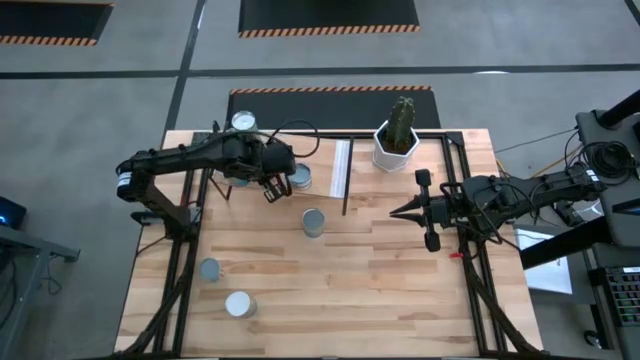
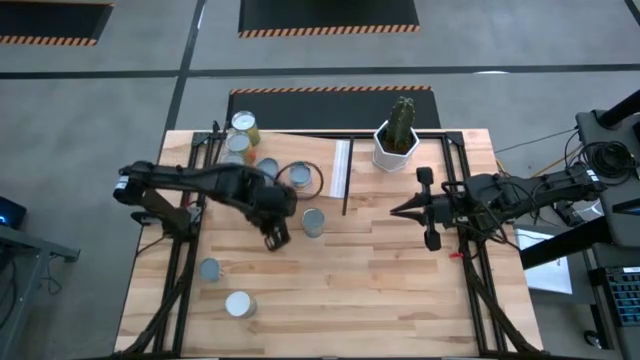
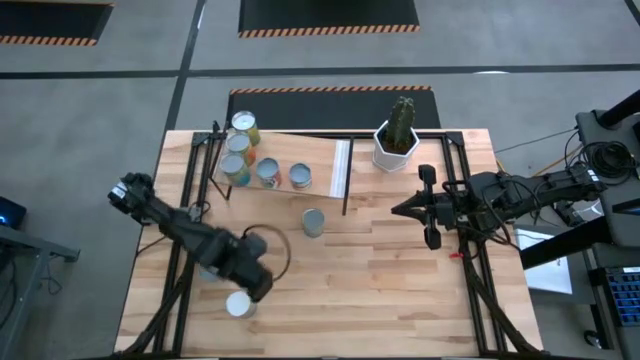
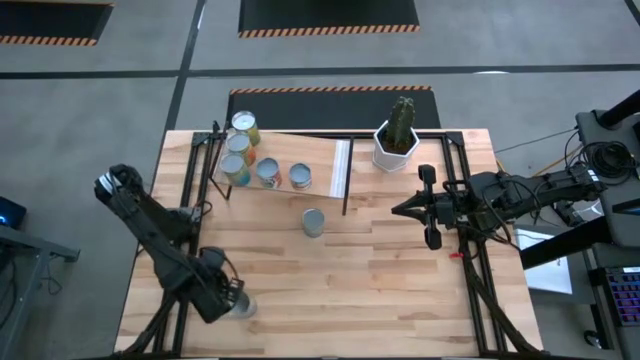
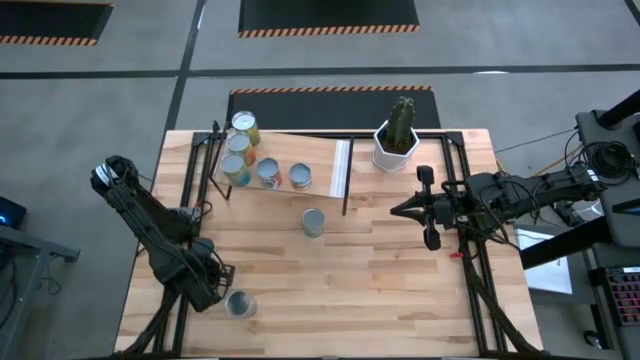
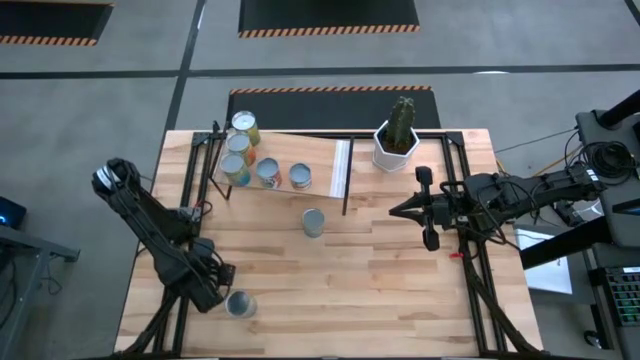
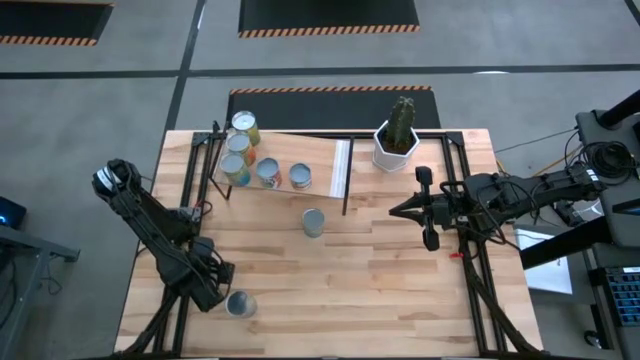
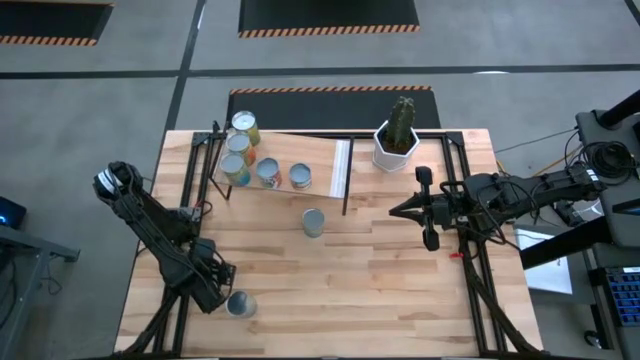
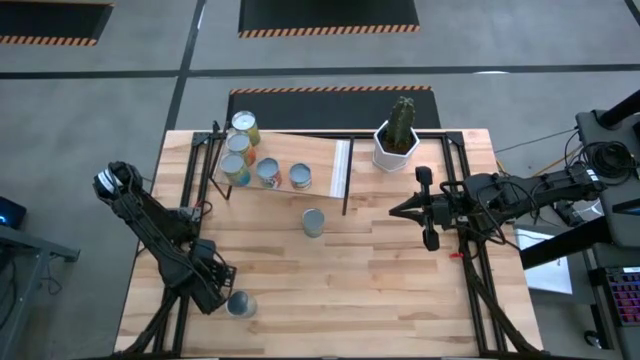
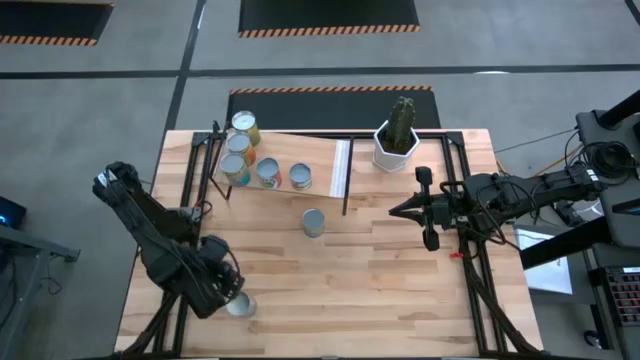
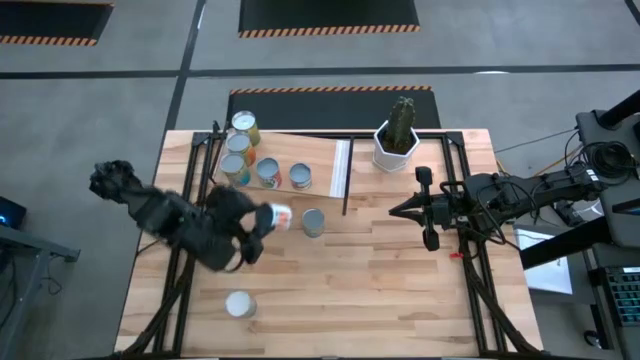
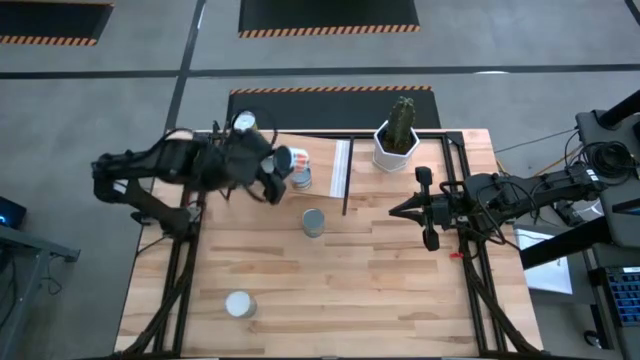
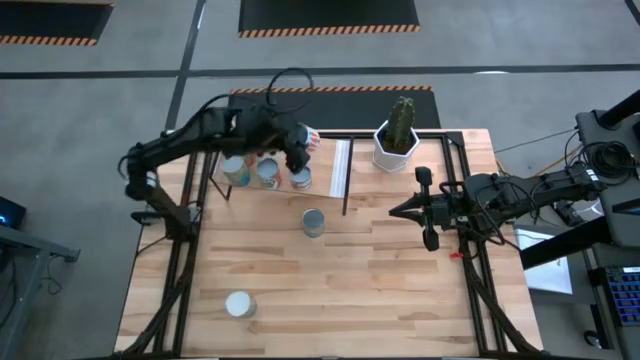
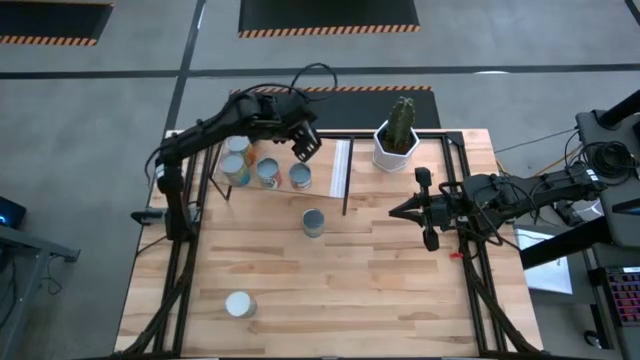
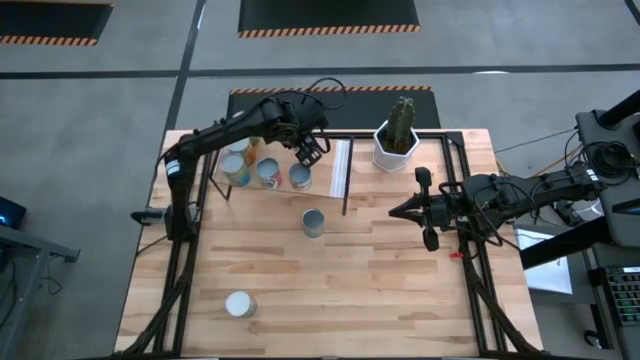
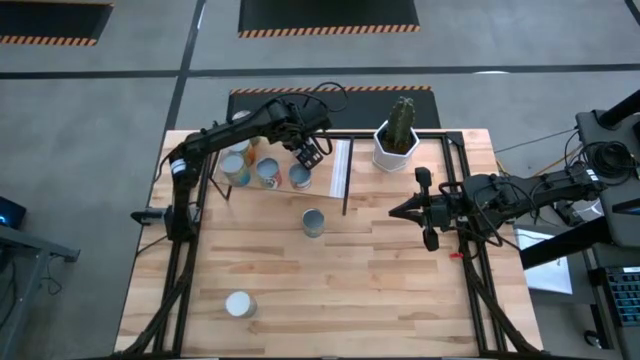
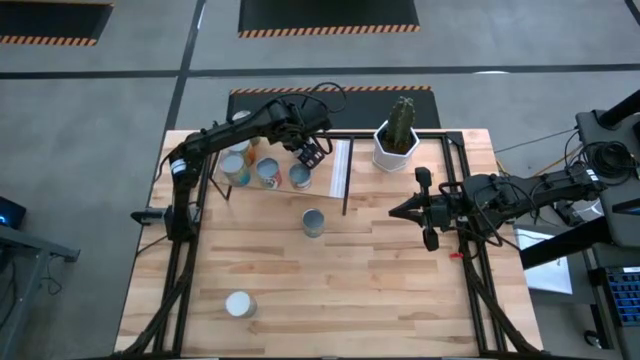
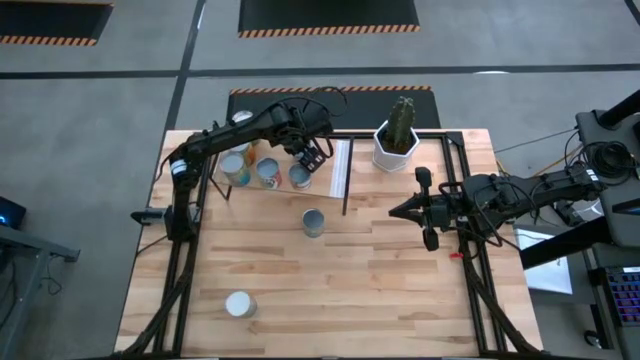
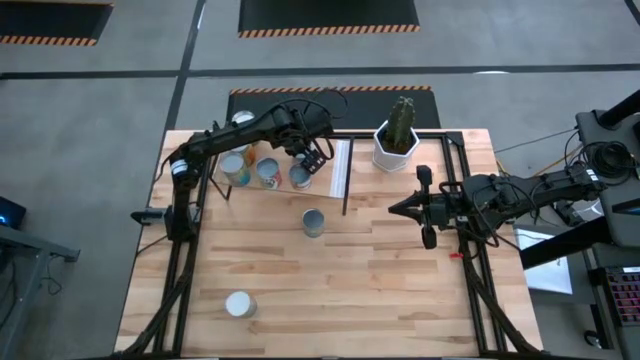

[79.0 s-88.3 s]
Task: Pick and place cans onto a shelf
Put the canned carrots on the shelf

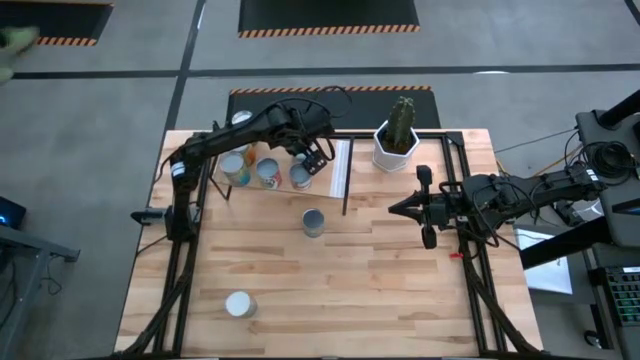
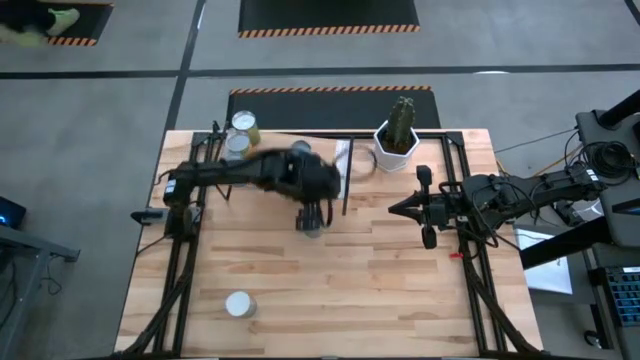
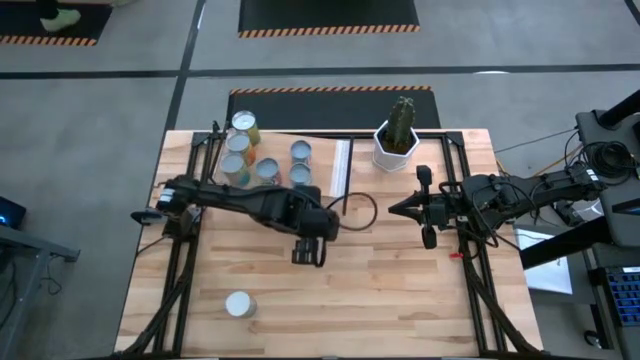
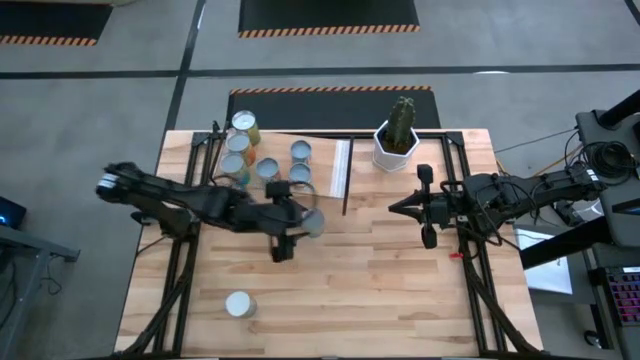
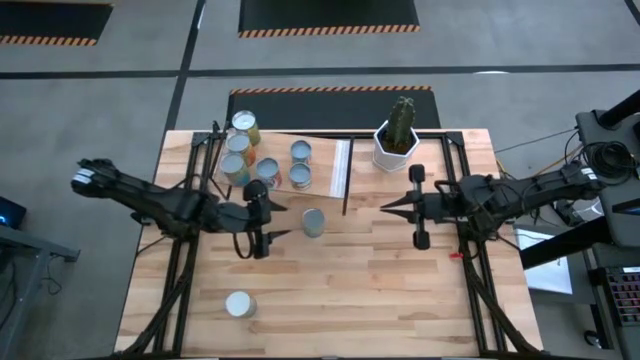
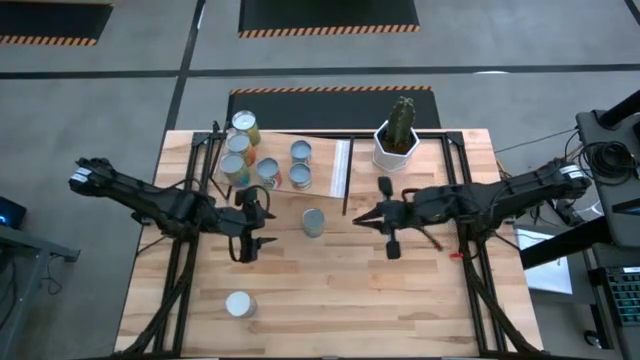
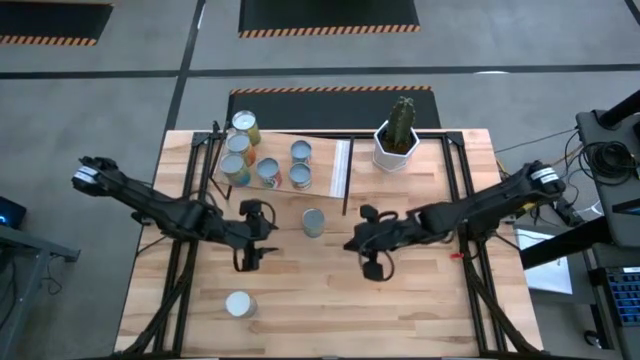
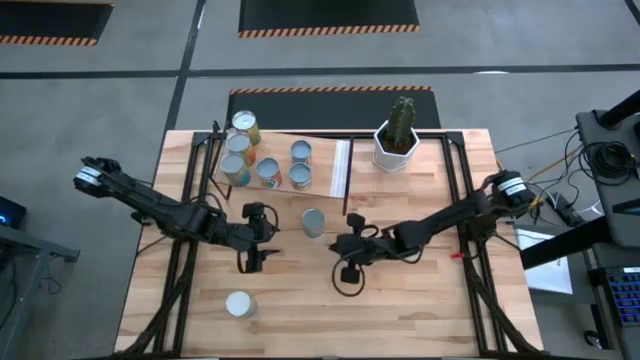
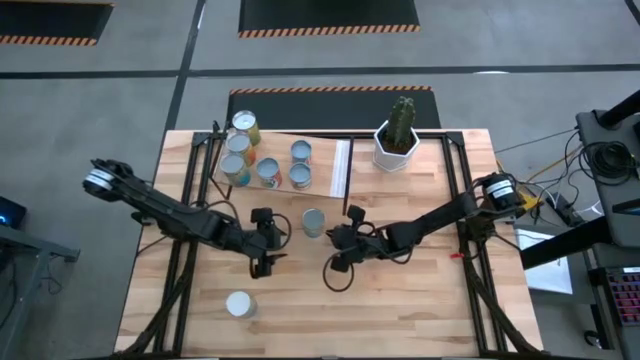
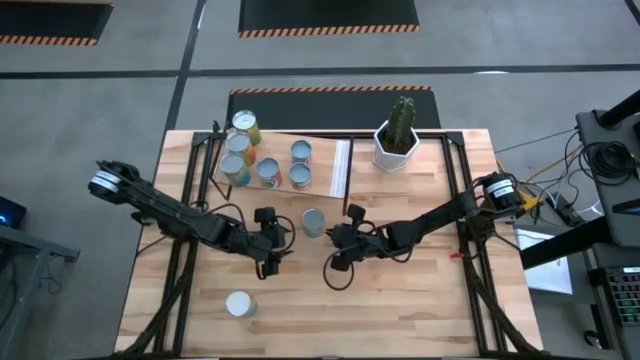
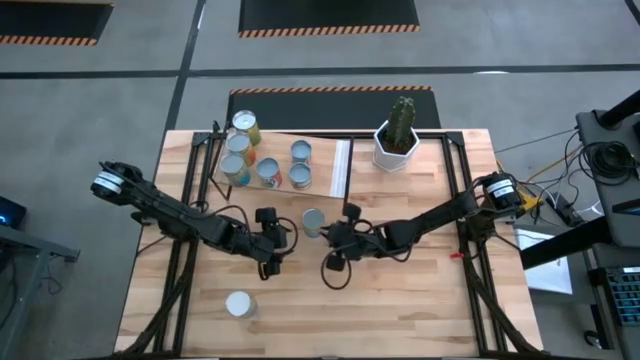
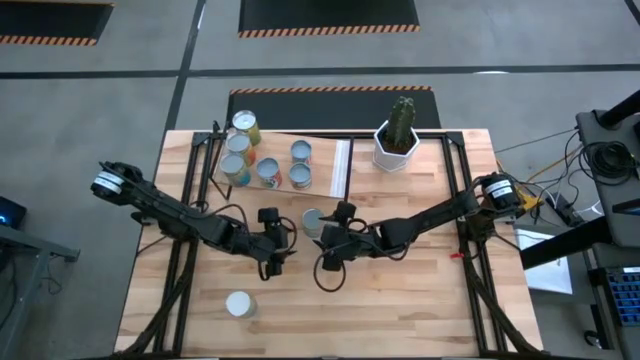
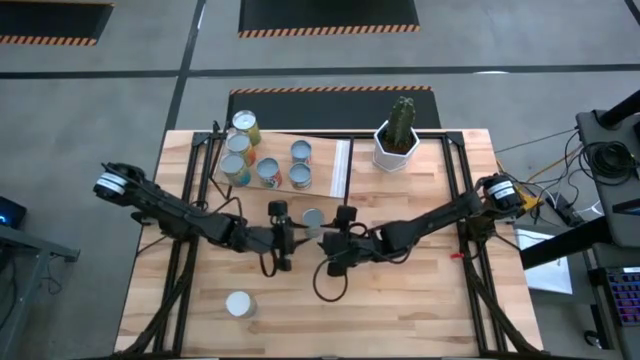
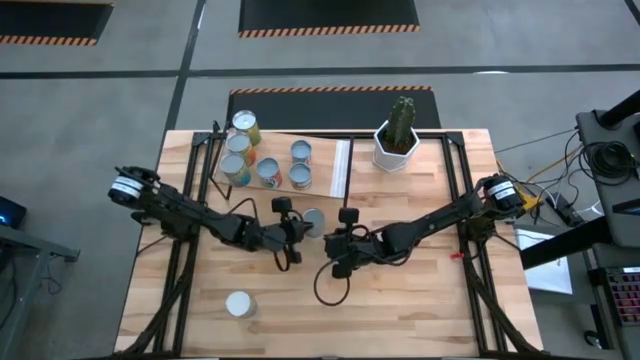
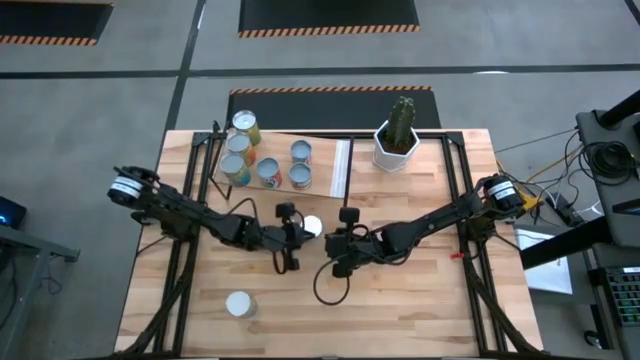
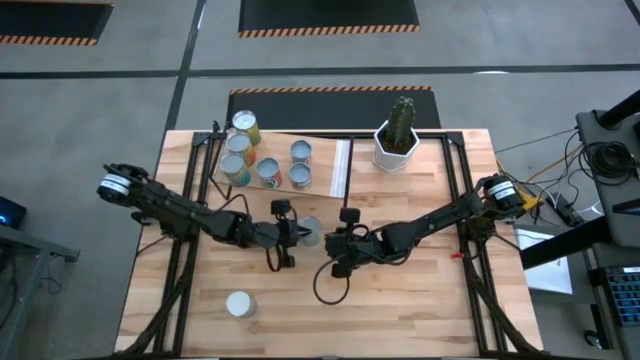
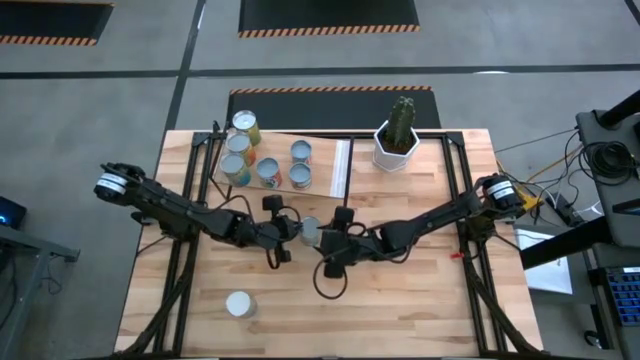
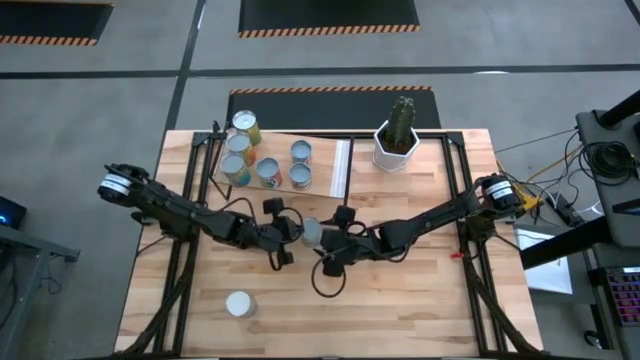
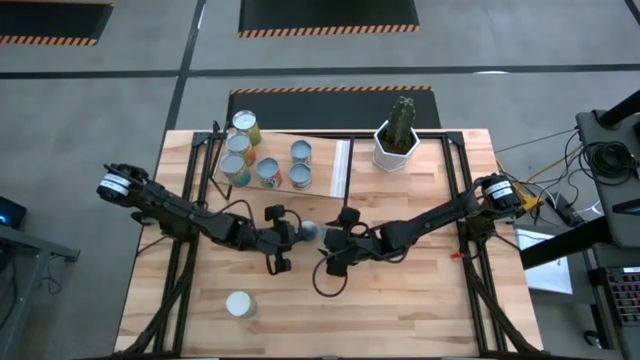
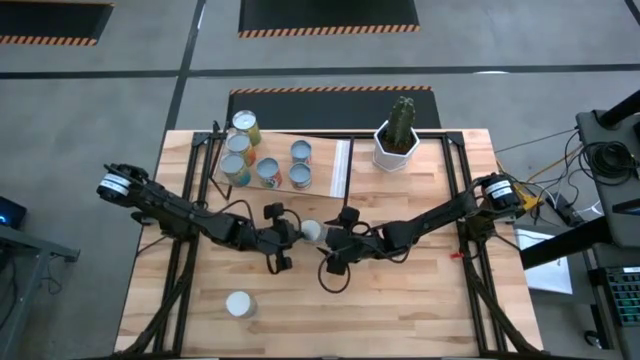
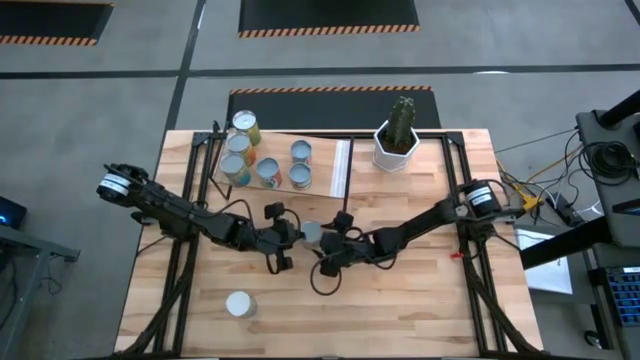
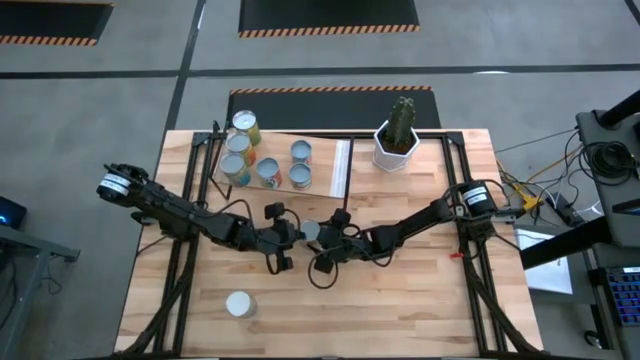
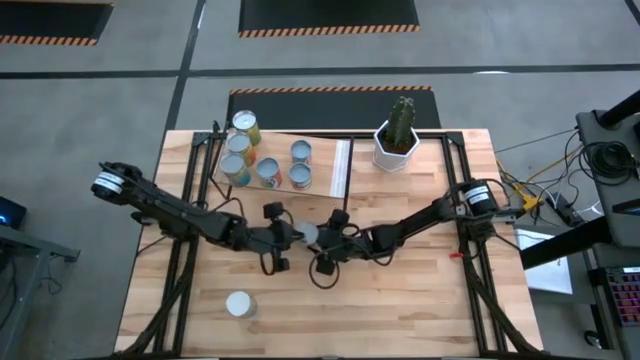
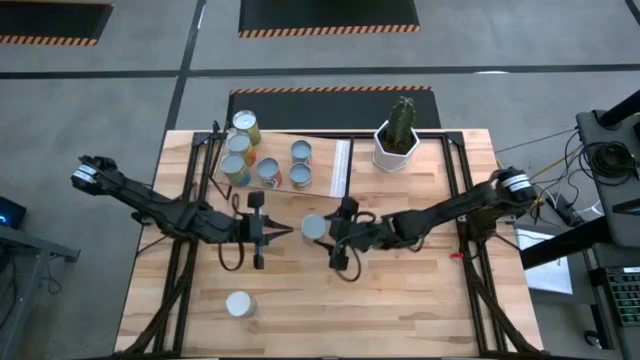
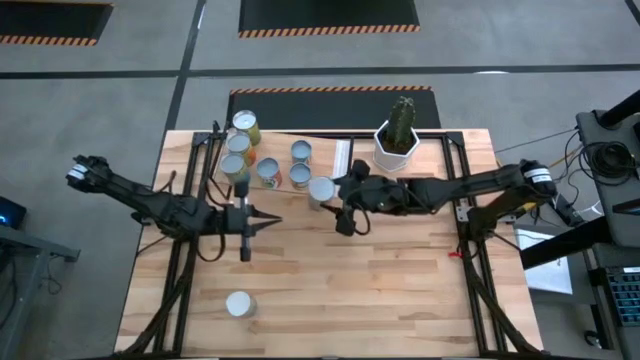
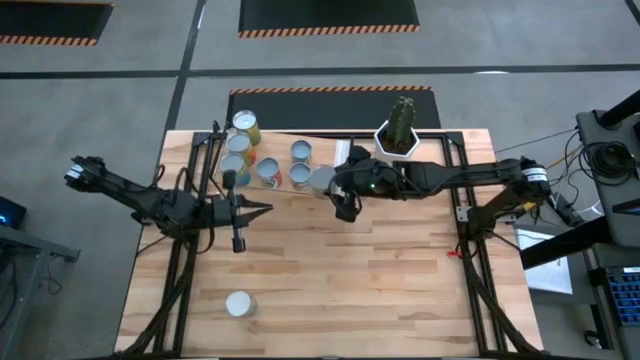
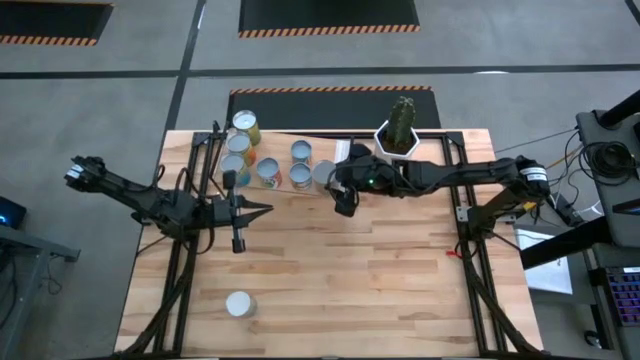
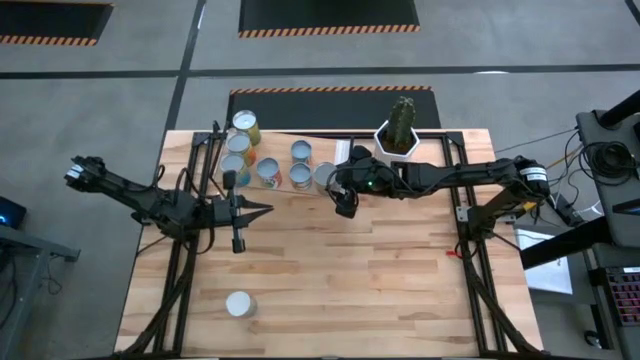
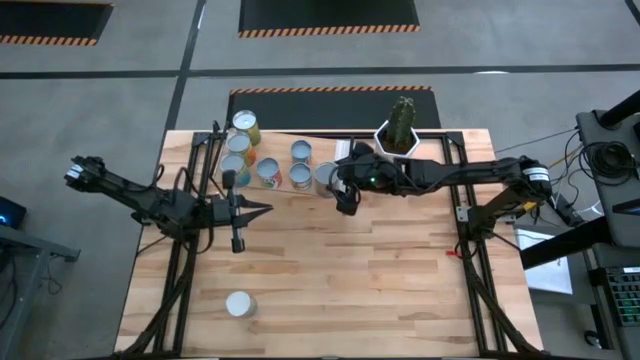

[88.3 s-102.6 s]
Put the canned tomatoes on the shelf
